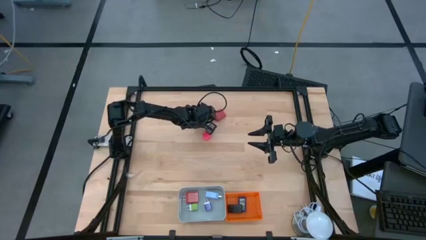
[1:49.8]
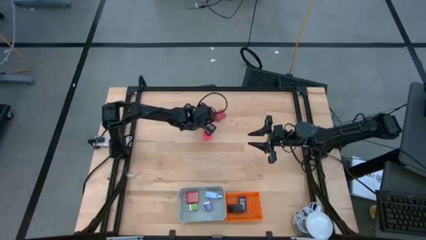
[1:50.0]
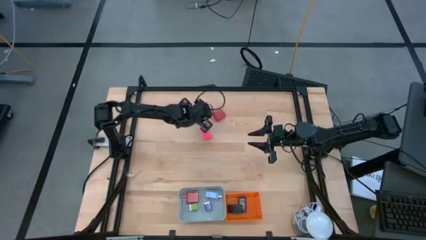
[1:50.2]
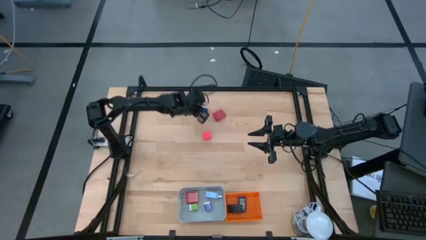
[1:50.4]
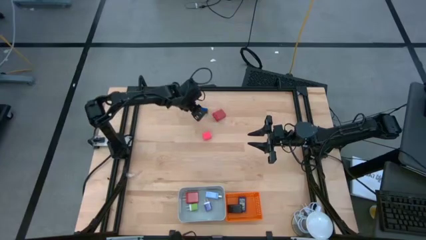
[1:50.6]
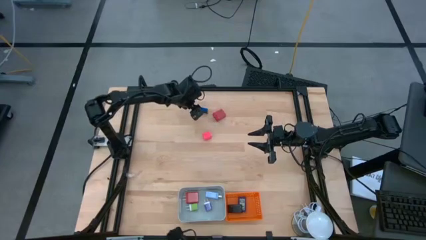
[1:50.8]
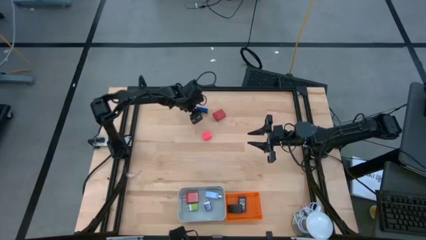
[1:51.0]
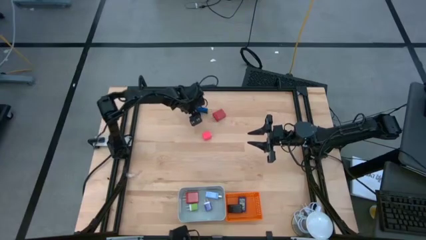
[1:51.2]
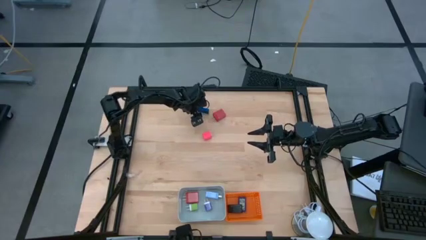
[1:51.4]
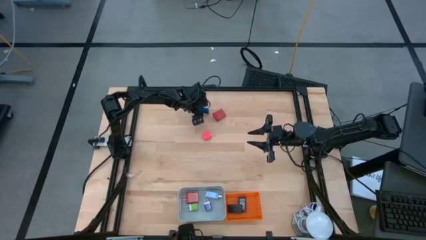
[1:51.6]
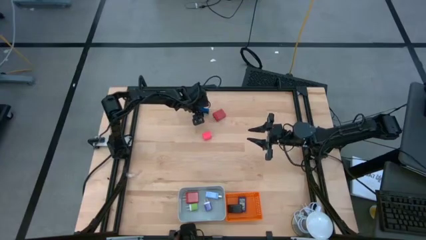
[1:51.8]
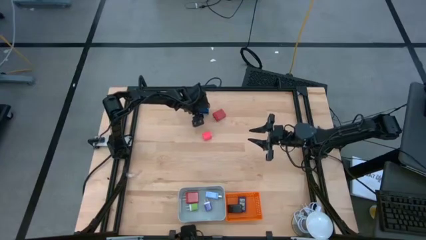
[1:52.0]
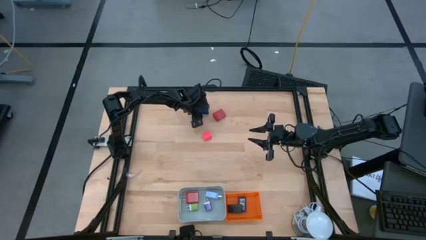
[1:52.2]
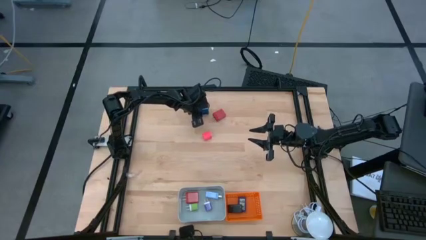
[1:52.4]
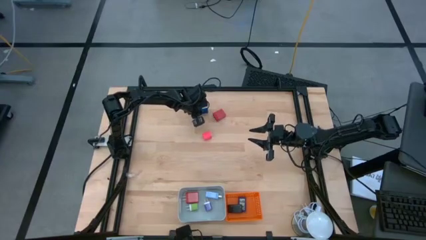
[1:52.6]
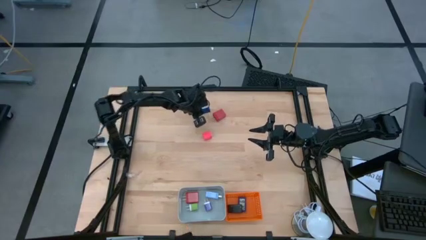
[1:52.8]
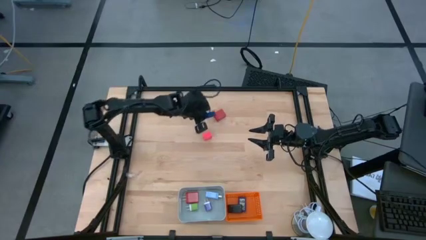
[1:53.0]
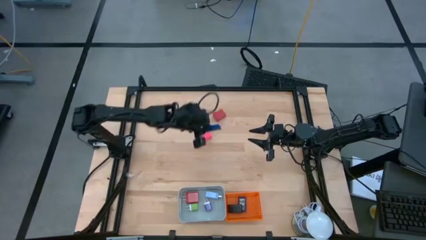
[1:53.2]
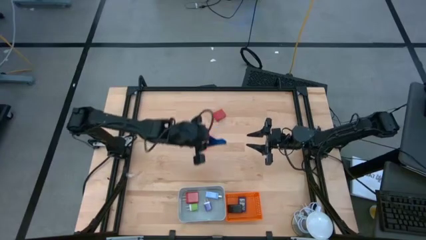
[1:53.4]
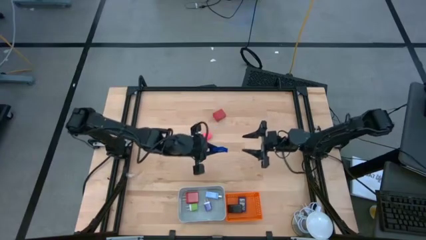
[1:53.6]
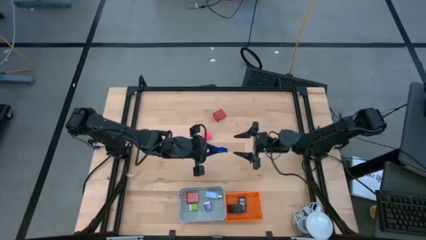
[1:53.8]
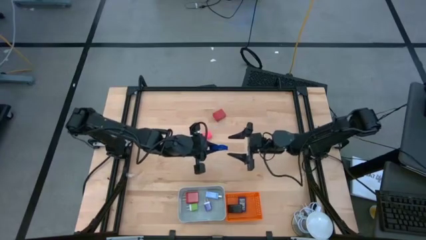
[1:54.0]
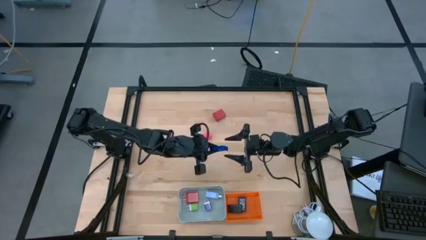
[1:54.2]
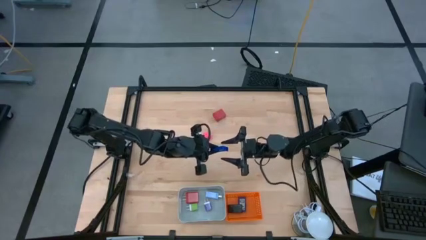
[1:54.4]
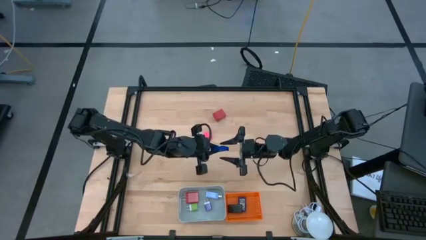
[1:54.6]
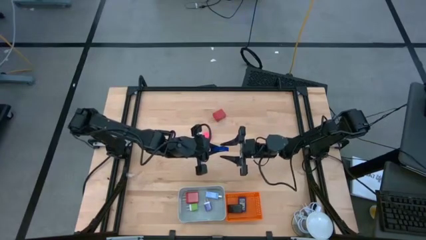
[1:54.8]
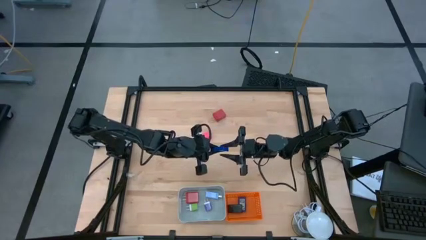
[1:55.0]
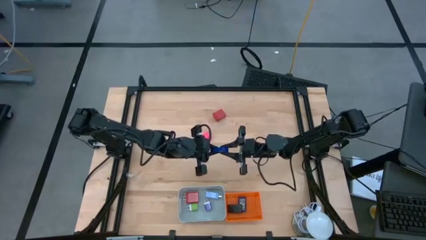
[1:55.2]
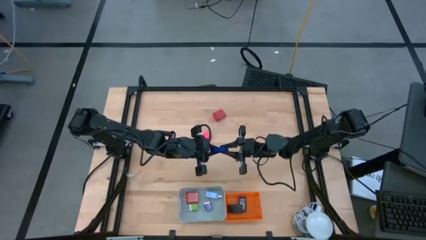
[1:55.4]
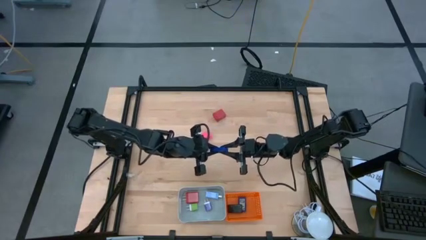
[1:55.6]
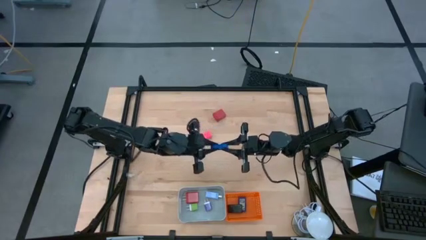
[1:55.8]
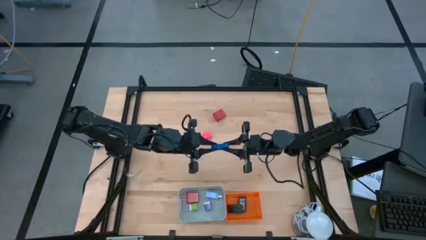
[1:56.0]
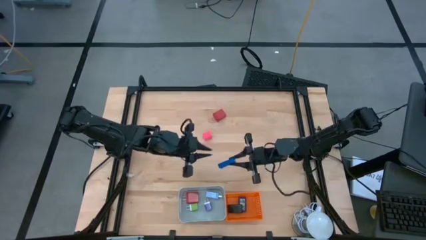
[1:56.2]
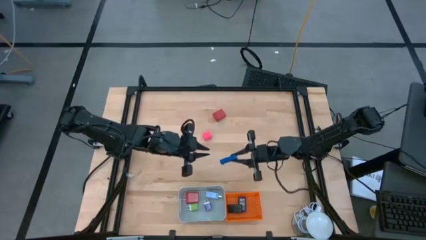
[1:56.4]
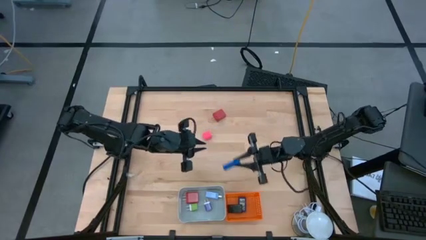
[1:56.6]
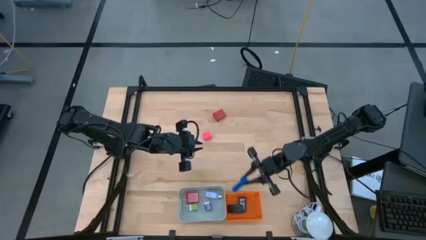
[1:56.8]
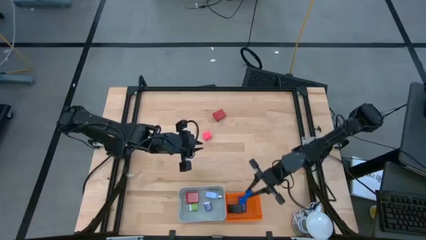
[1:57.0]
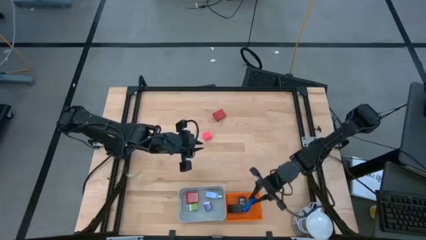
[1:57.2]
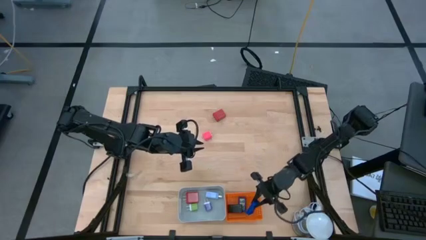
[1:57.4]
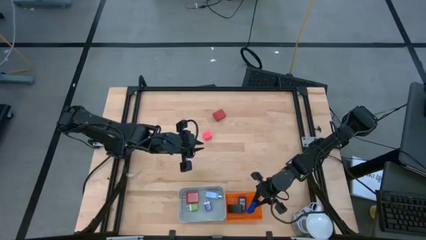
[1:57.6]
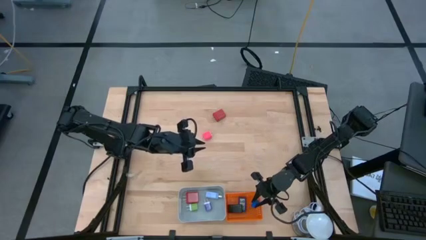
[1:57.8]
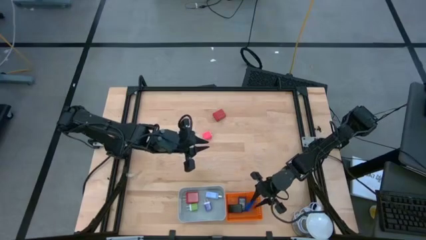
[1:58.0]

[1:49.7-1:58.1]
Task: Pick & Place Office items
Put the blue digital timer into the orange bin

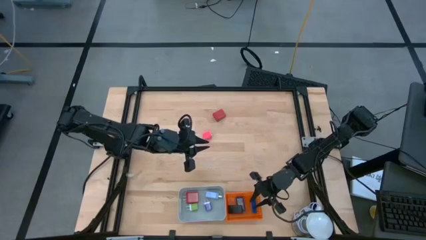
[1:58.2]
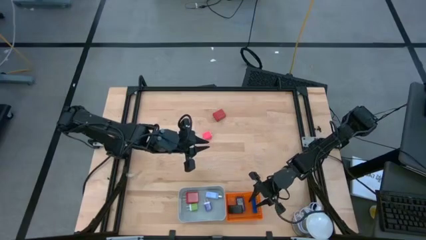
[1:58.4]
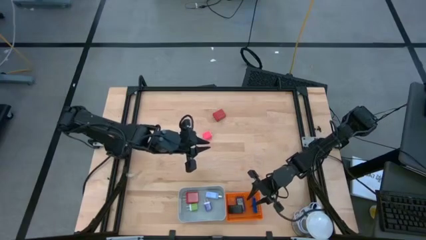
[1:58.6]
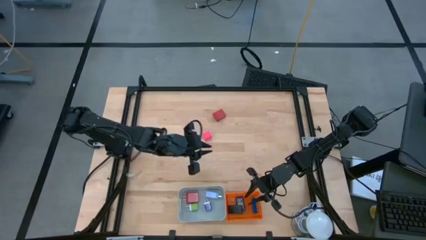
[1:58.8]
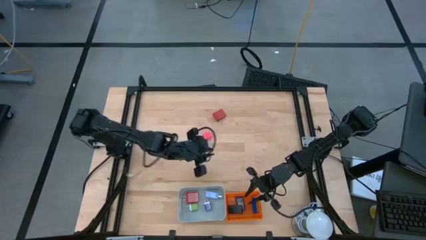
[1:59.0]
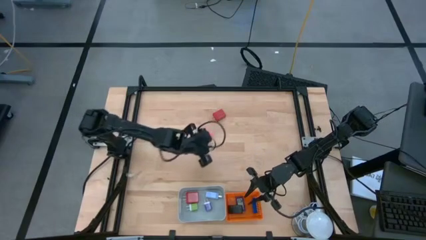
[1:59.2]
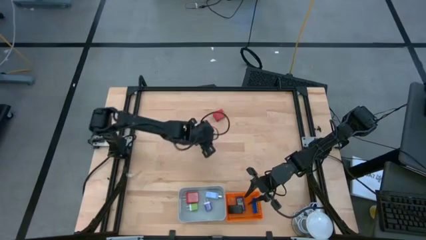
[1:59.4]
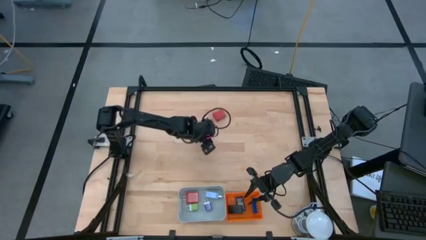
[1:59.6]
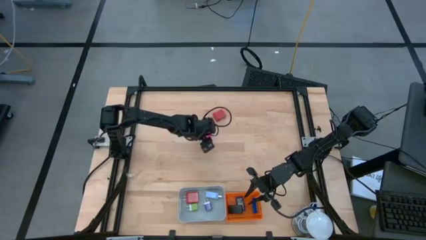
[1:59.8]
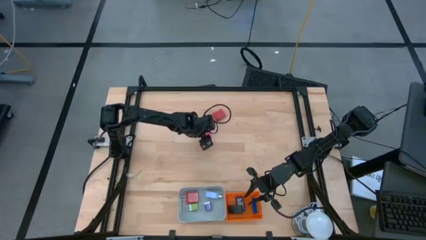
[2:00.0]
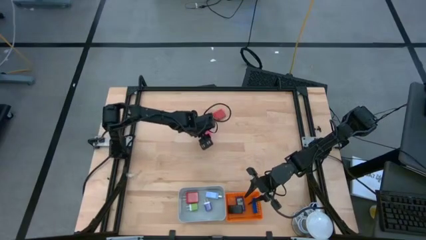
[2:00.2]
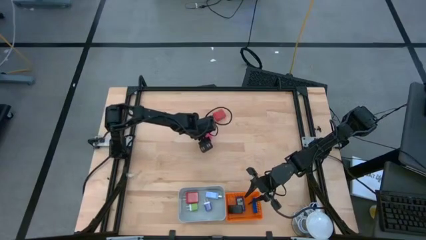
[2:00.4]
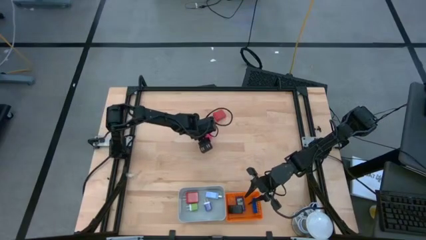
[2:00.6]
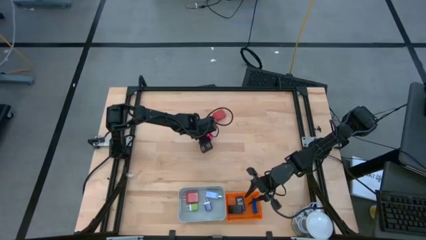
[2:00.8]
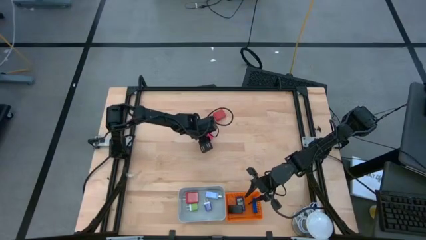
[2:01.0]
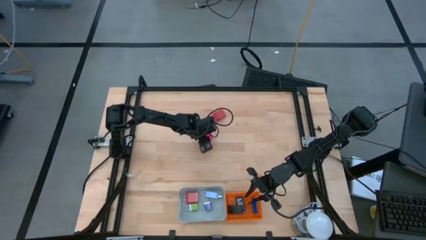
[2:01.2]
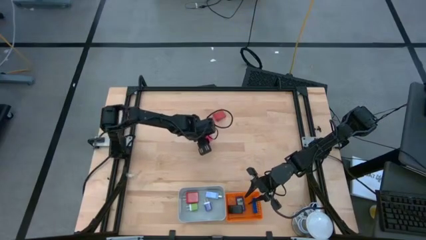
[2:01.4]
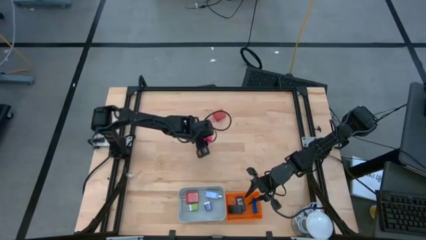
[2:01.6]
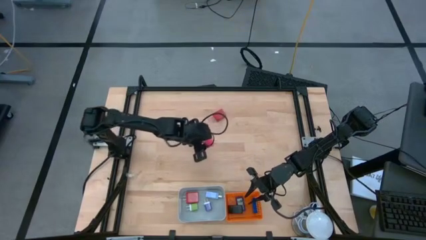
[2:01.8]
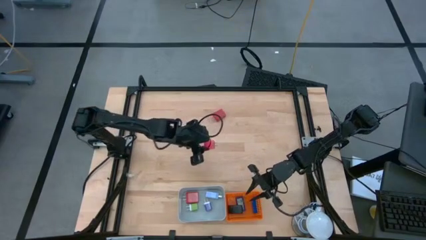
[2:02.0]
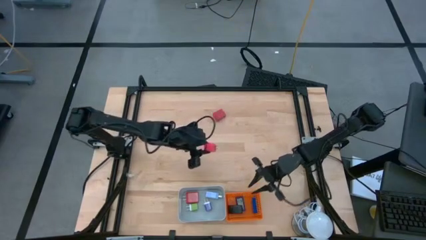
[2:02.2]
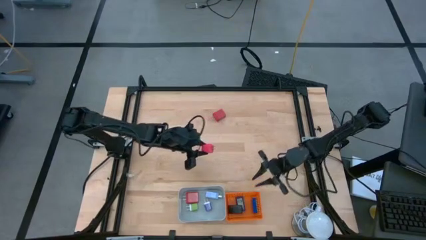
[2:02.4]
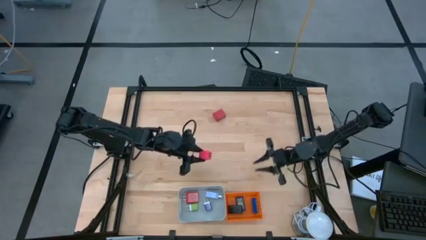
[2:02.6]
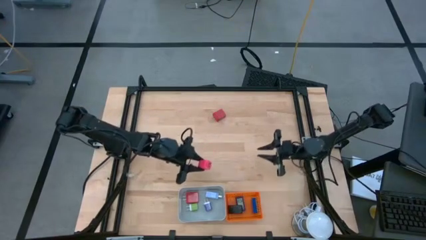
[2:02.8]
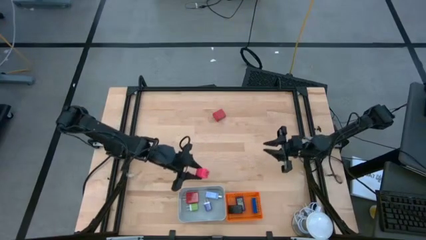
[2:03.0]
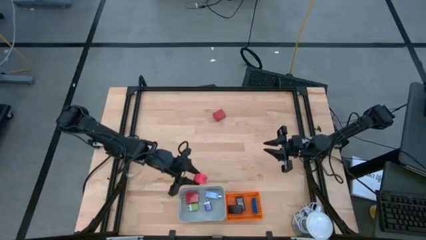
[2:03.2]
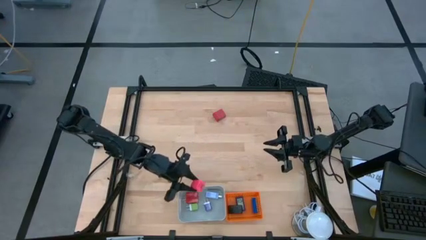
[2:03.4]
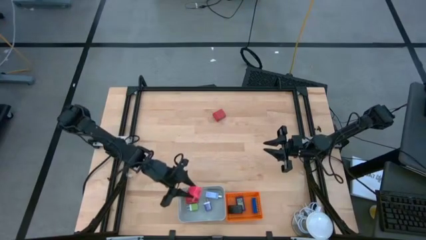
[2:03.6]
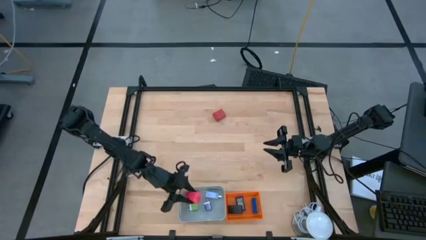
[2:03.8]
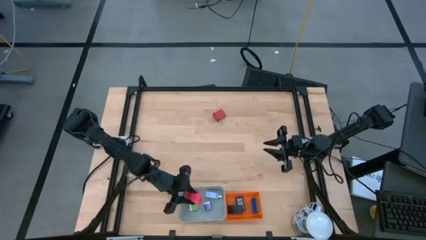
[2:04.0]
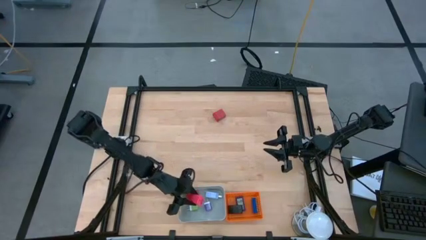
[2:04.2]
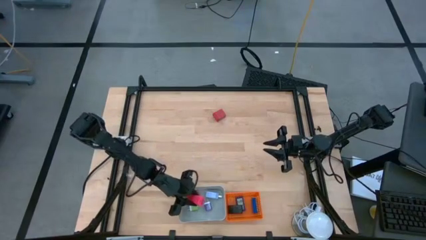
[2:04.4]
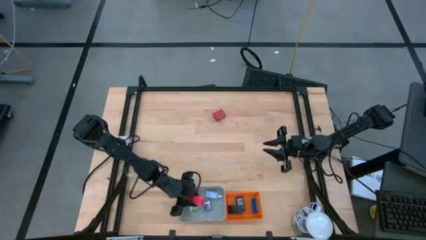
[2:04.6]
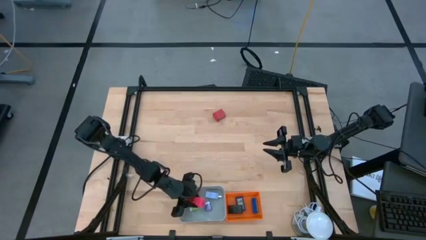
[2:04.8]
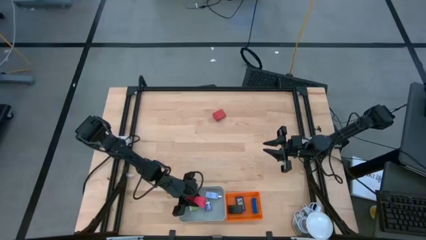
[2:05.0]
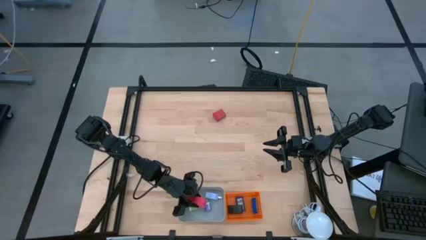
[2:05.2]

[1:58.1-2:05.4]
Put the pink charger adapter into the gray bin
